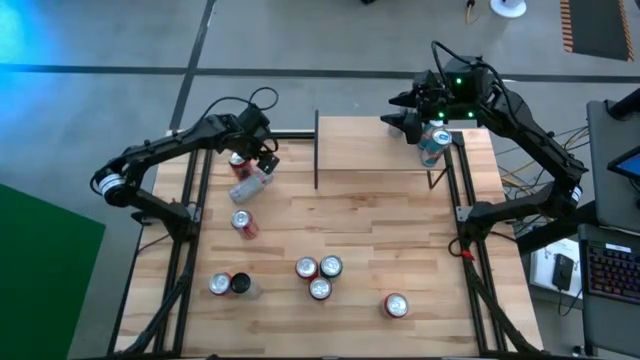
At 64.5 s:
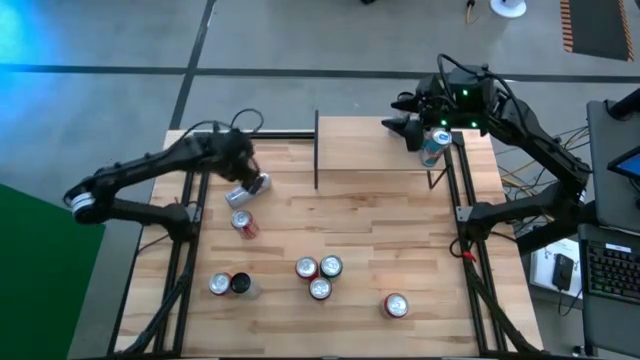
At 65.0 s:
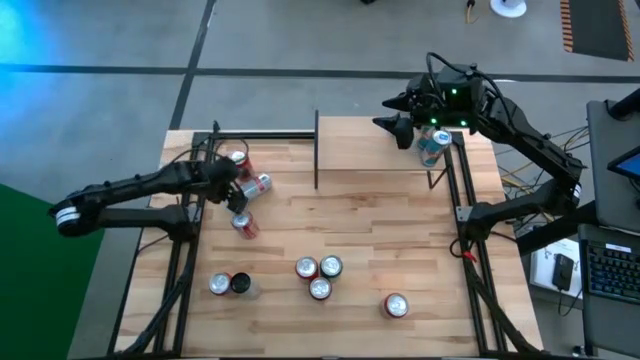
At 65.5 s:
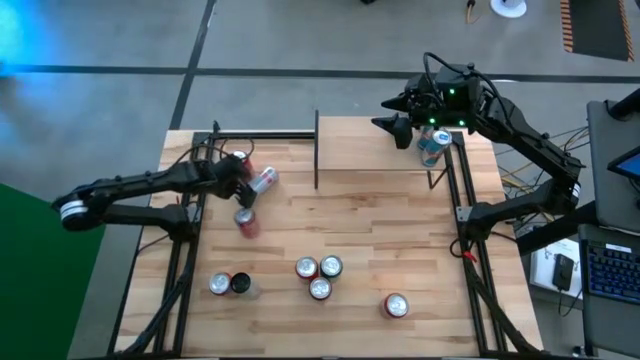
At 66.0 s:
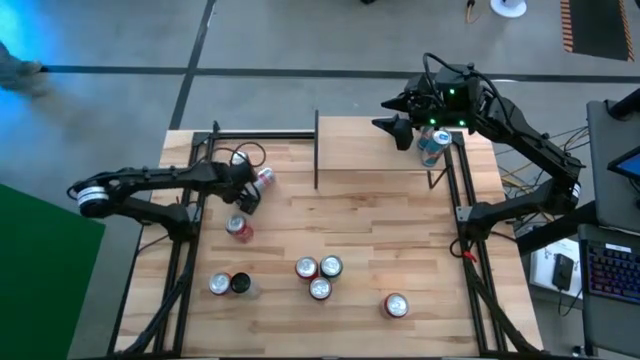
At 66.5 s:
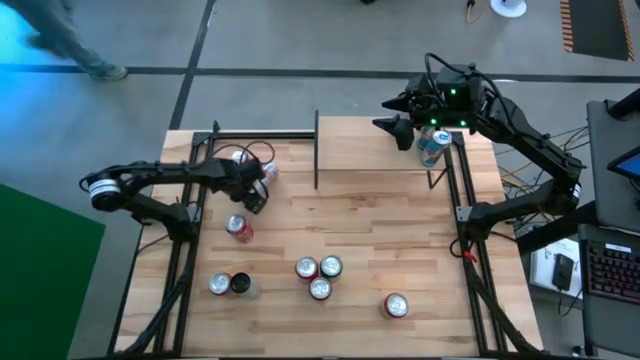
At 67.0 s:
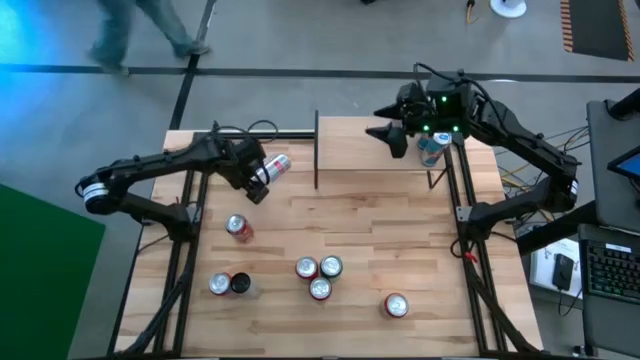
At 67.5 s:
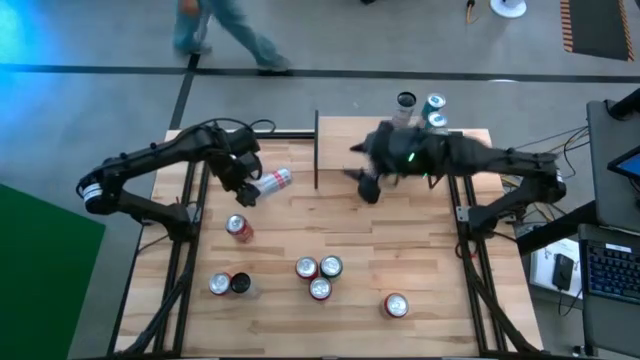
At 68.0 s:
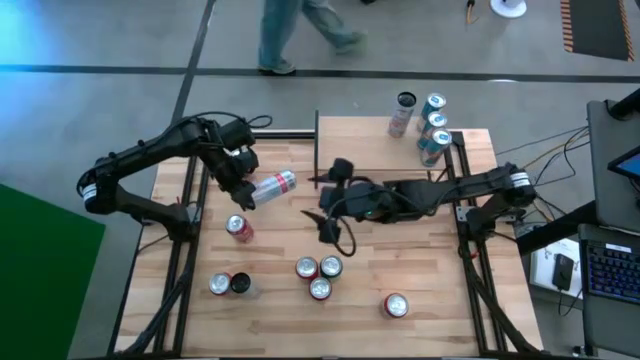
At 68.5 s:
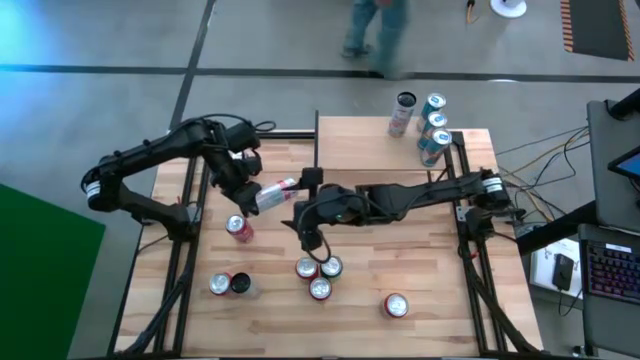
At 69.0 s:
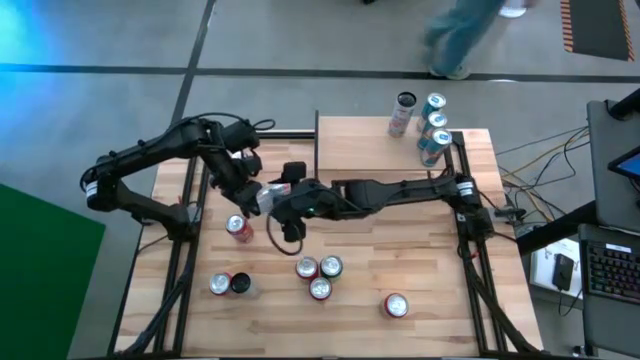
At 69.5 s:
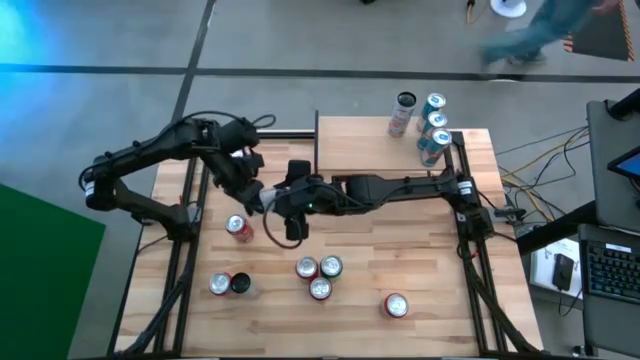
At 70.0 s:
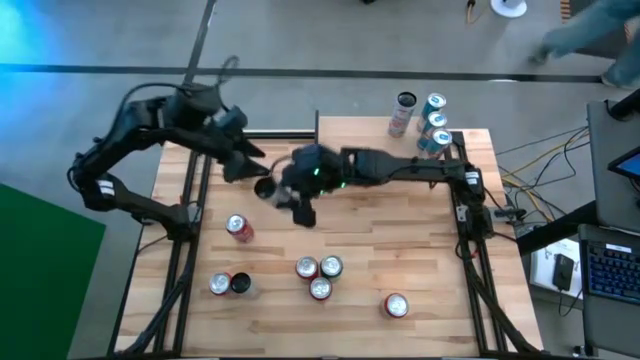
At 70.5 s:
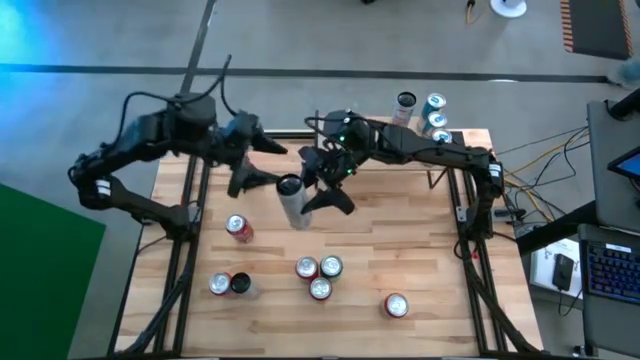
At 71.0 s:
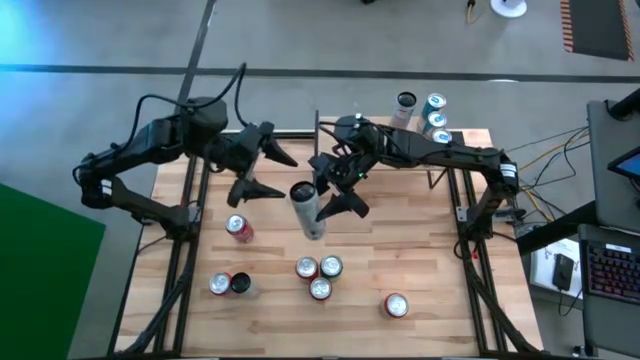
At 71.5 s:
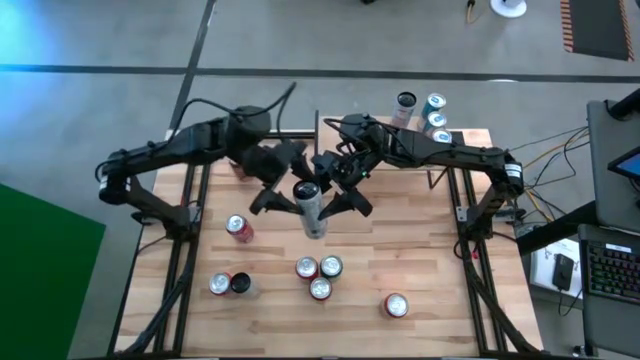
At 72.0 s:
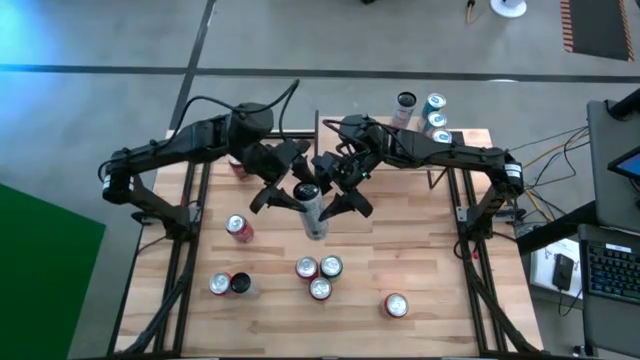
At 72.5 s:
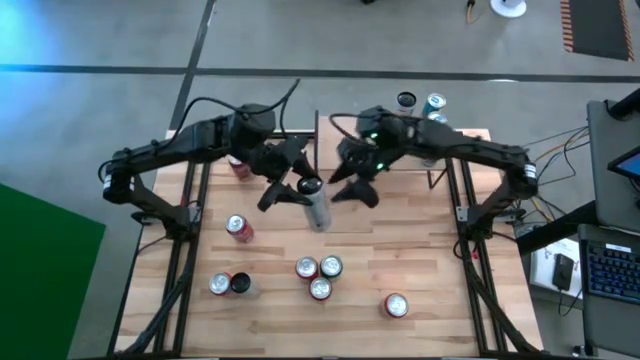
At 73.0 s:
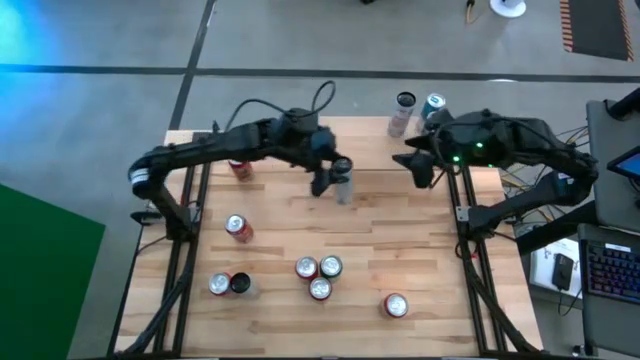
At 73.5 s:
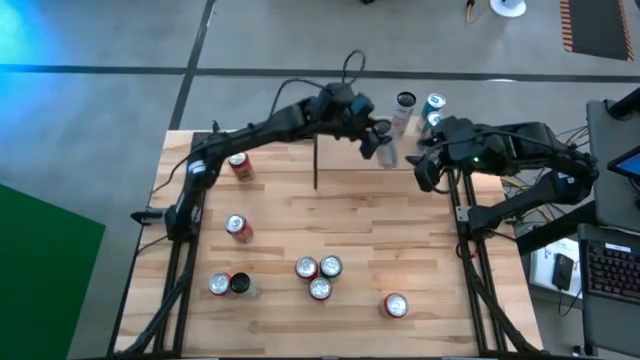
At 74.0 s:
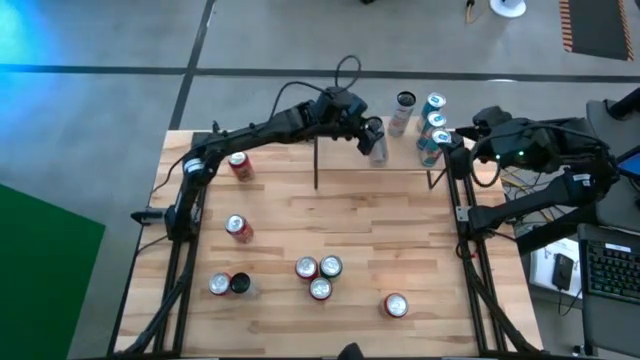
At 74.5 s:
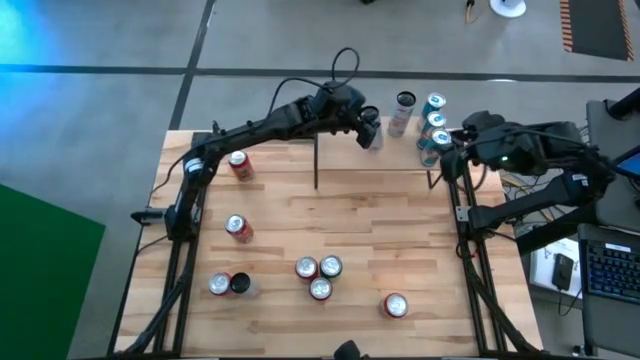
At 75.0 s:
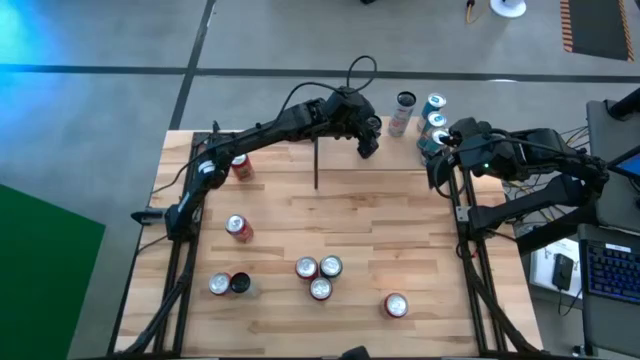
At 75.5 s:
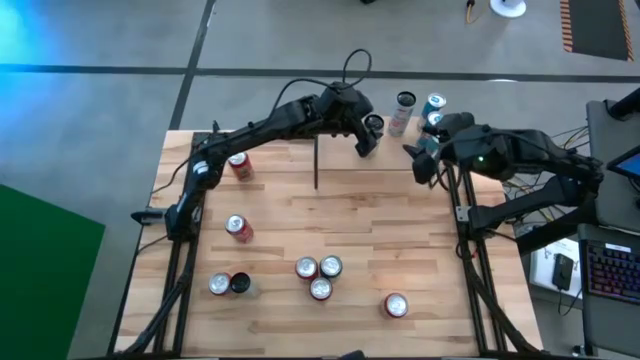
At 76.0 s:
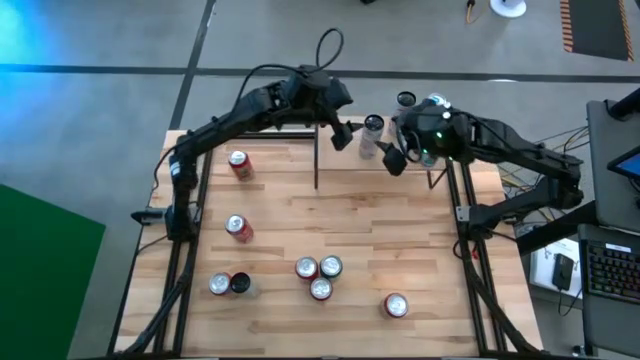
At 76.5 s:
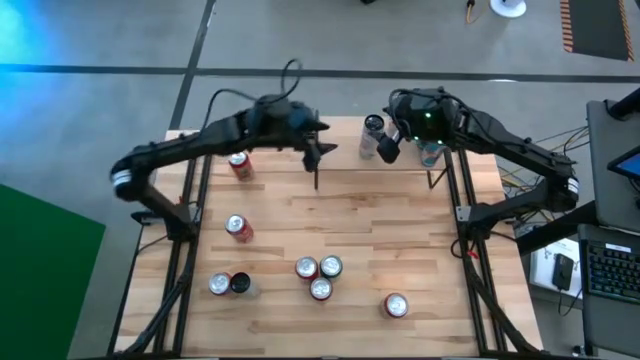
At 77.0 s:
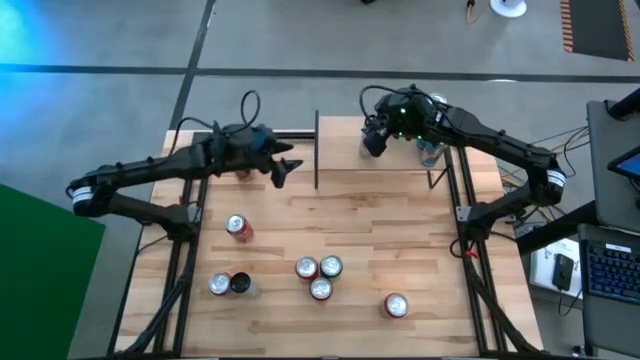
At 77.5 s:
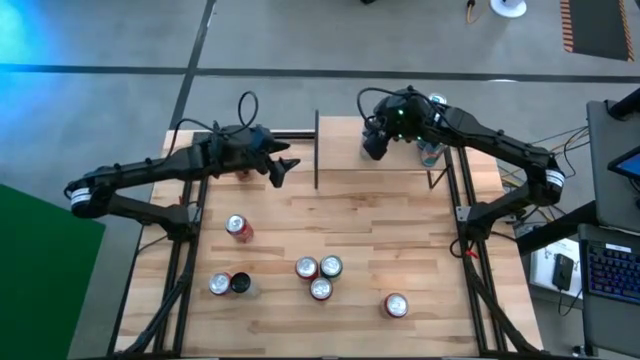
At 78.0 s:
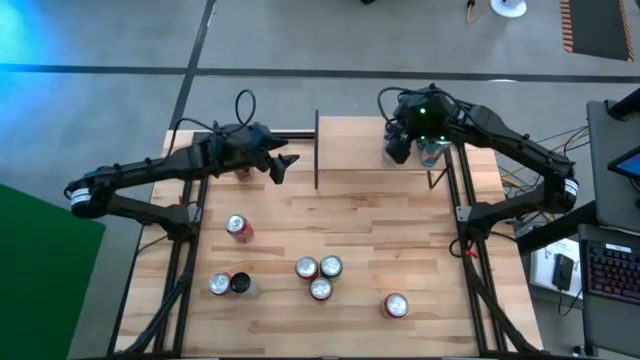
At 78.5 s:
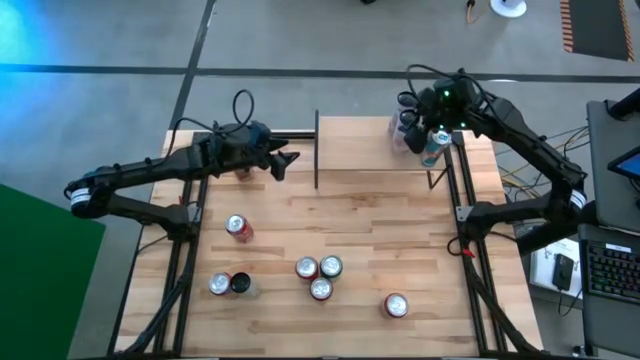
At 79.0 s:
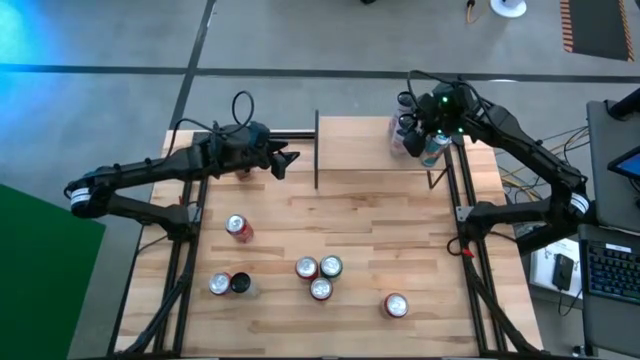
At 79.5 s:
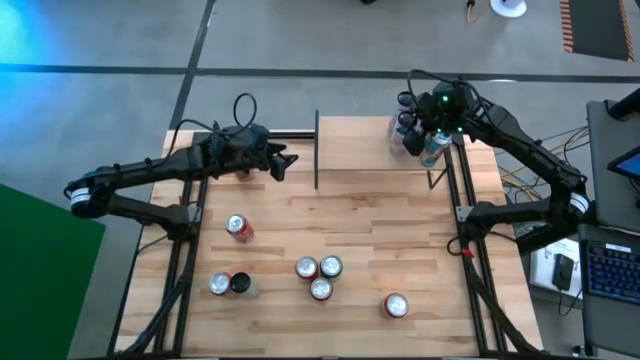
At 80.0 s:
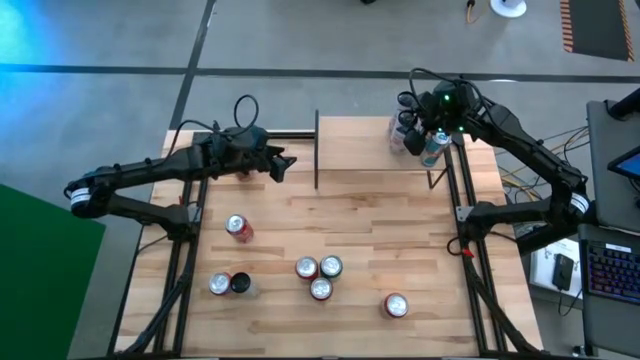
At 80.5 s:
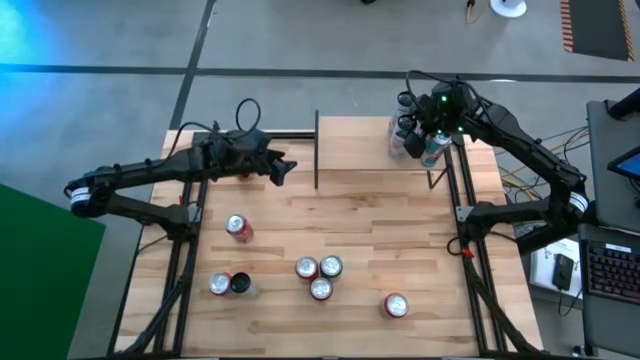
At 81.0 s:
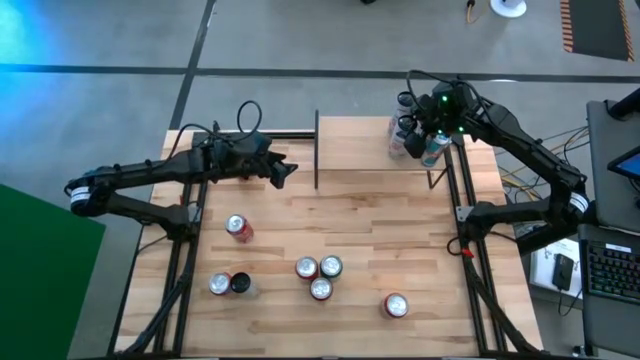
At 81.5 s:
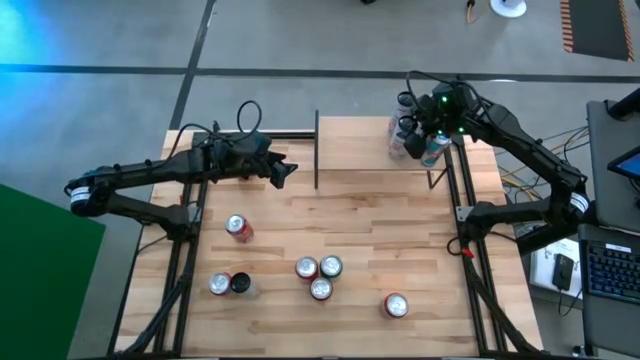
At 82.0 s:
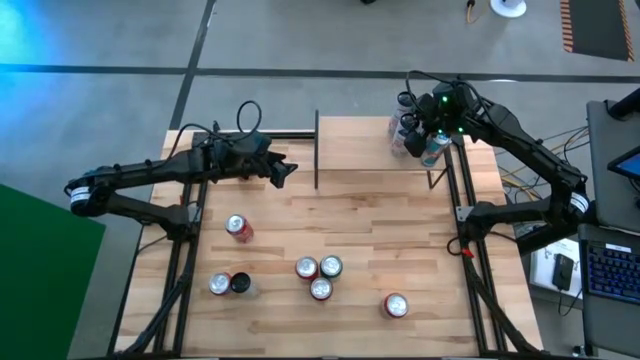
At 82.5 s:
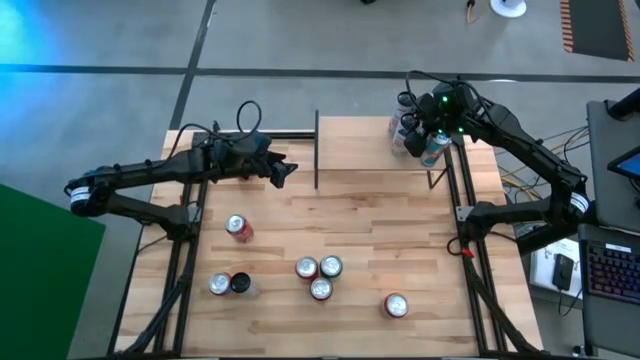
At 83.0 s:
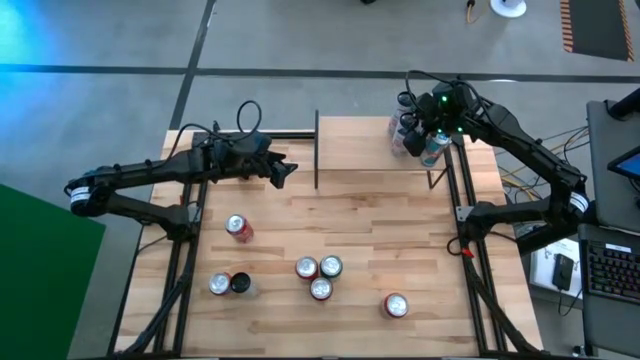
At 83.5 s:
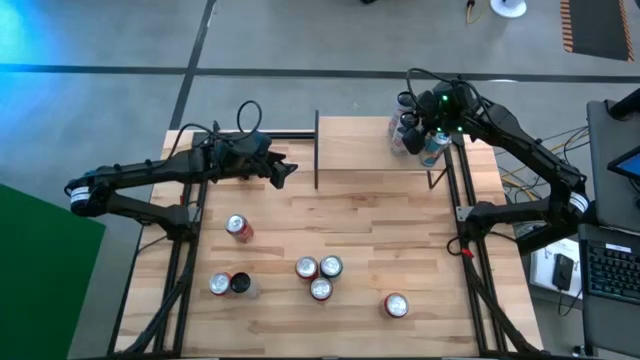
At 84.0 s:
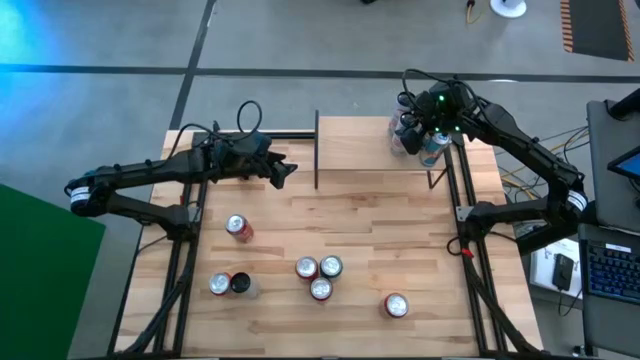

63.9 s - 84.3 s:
Task: Place canned beverage on shelf
Put the top white-pink soda can on the shelf aligned with the other white-pink soda can
